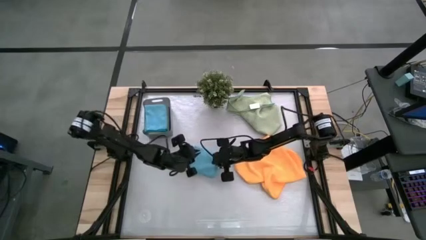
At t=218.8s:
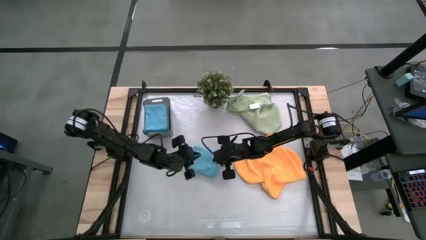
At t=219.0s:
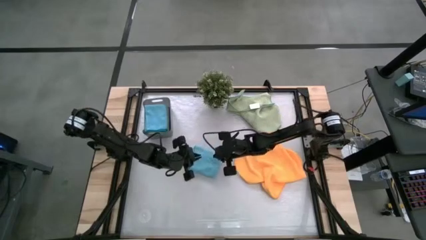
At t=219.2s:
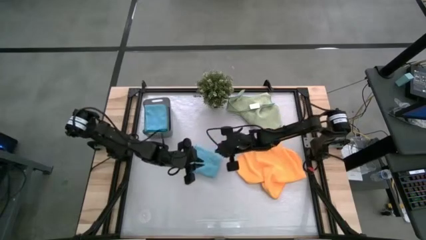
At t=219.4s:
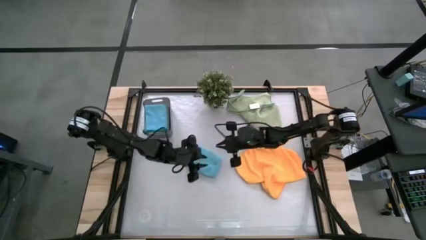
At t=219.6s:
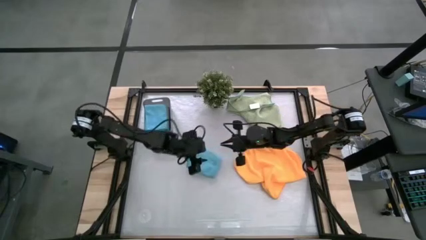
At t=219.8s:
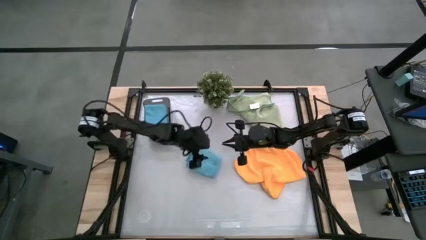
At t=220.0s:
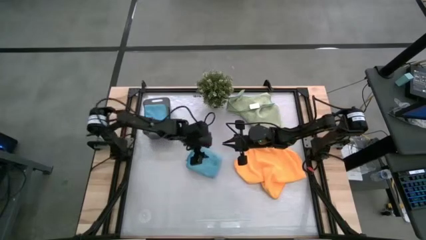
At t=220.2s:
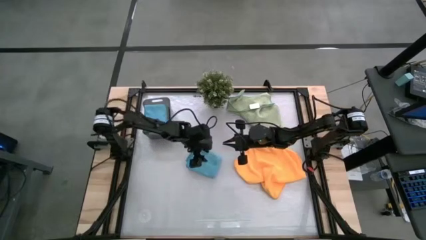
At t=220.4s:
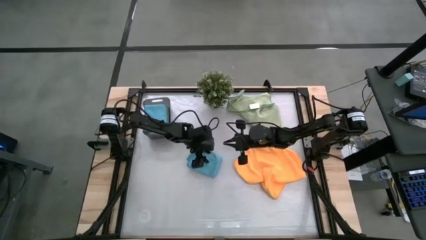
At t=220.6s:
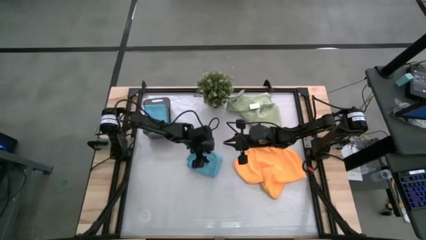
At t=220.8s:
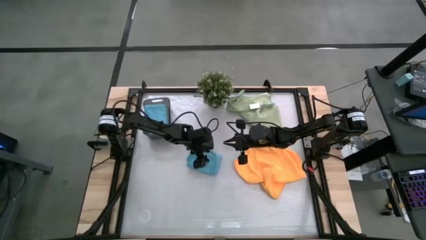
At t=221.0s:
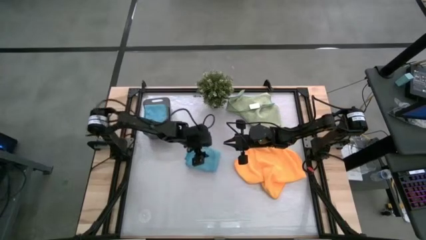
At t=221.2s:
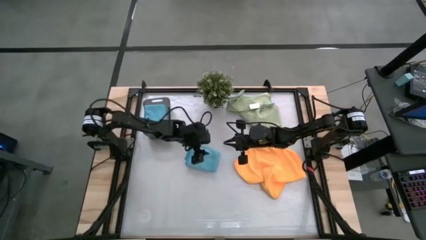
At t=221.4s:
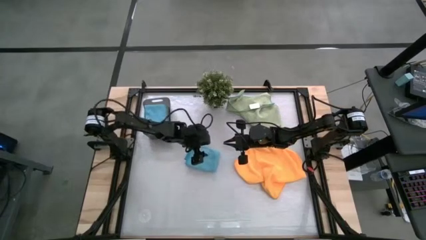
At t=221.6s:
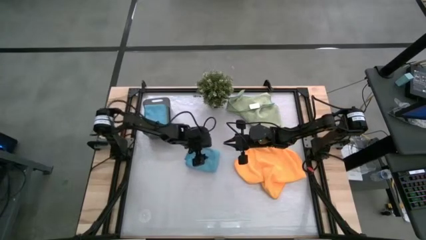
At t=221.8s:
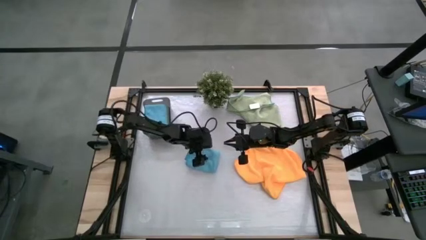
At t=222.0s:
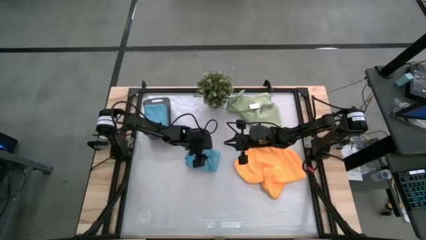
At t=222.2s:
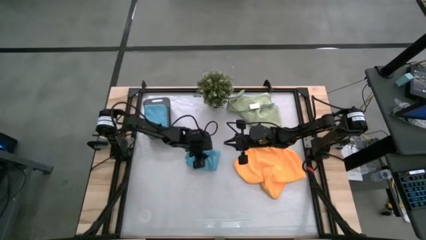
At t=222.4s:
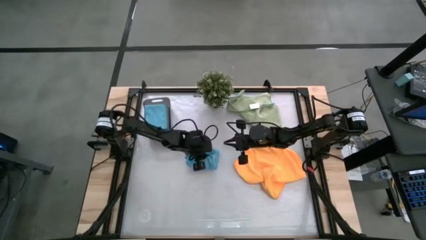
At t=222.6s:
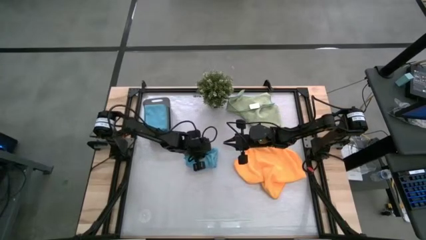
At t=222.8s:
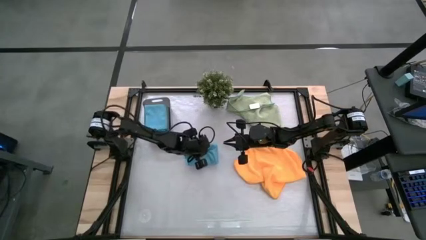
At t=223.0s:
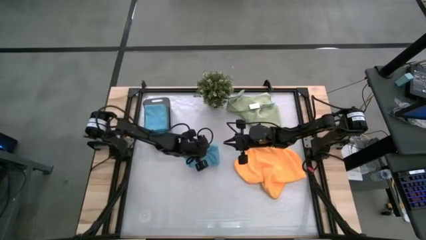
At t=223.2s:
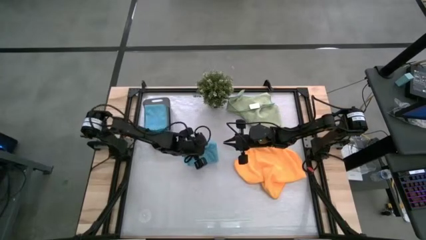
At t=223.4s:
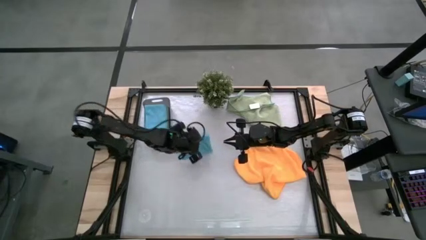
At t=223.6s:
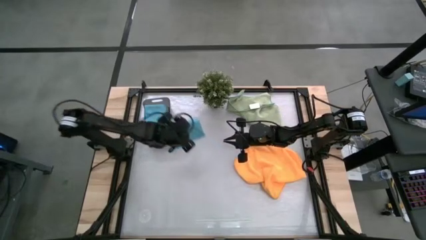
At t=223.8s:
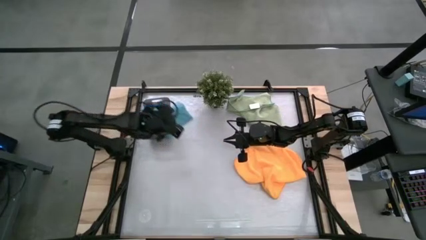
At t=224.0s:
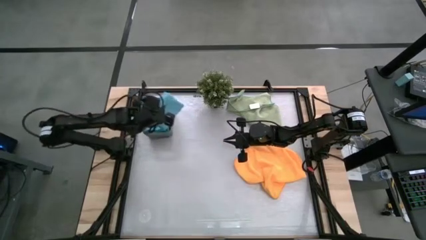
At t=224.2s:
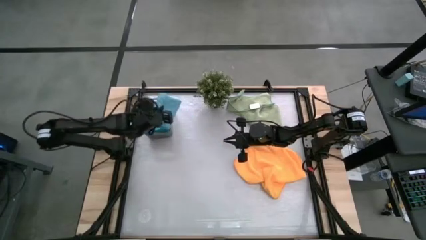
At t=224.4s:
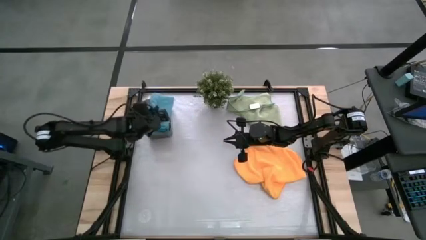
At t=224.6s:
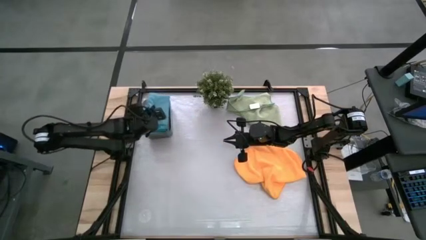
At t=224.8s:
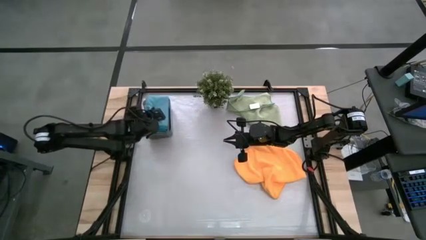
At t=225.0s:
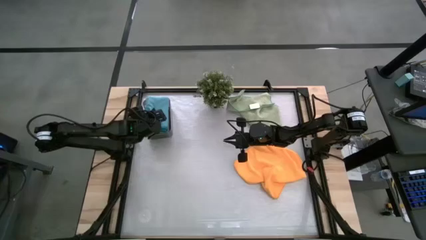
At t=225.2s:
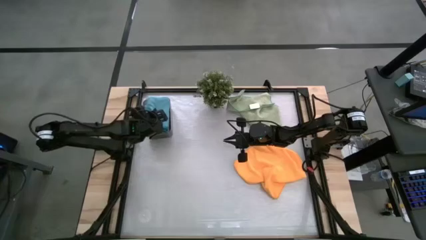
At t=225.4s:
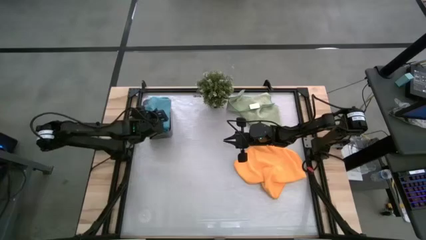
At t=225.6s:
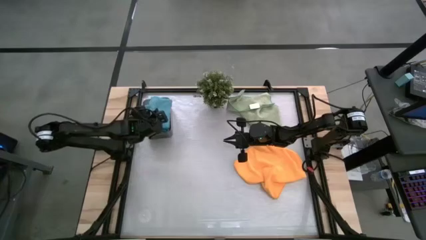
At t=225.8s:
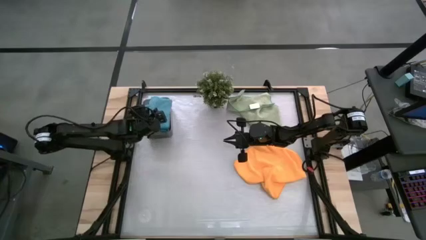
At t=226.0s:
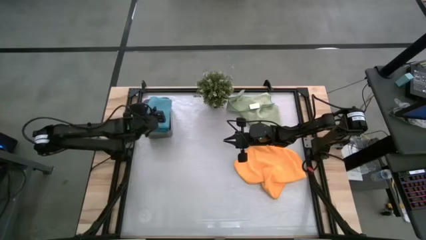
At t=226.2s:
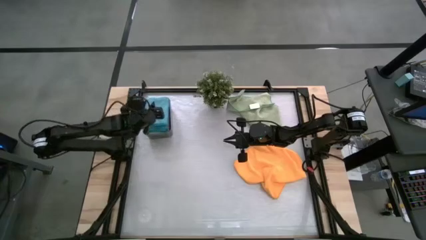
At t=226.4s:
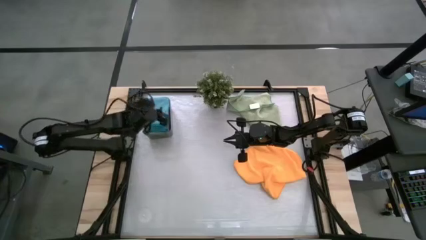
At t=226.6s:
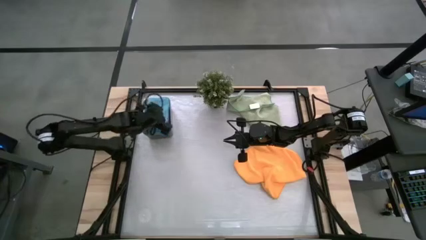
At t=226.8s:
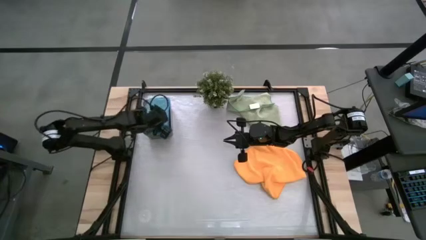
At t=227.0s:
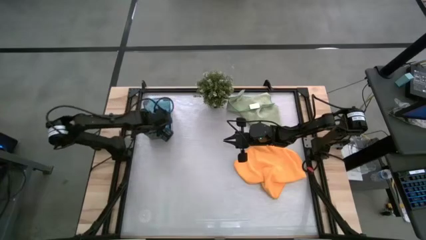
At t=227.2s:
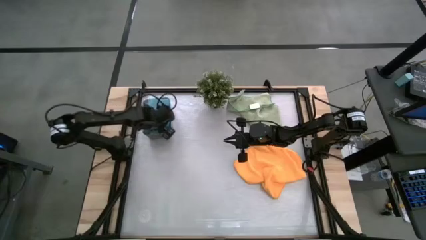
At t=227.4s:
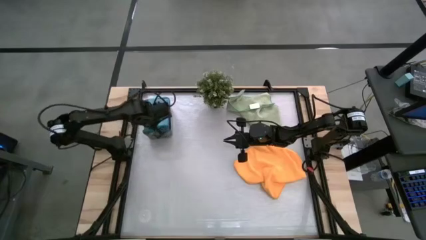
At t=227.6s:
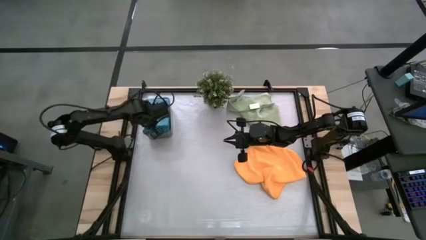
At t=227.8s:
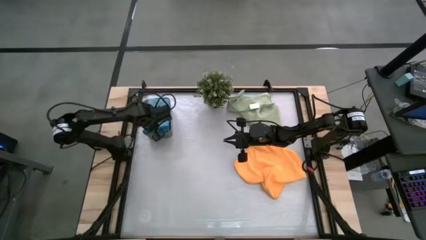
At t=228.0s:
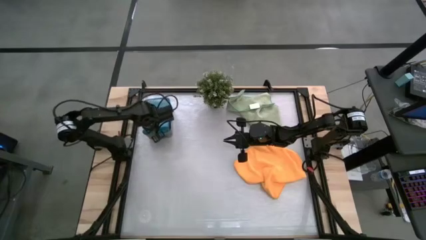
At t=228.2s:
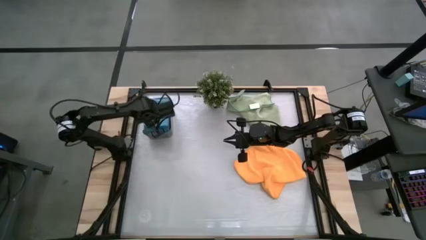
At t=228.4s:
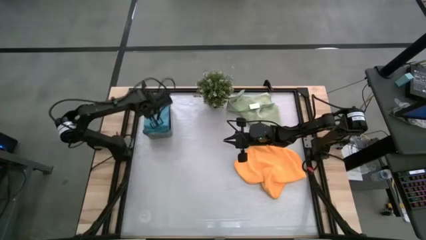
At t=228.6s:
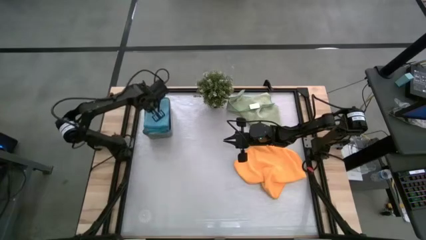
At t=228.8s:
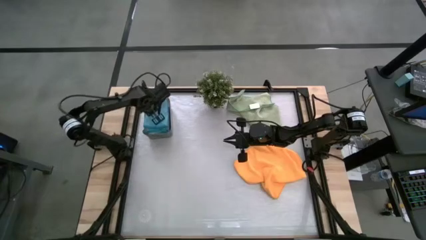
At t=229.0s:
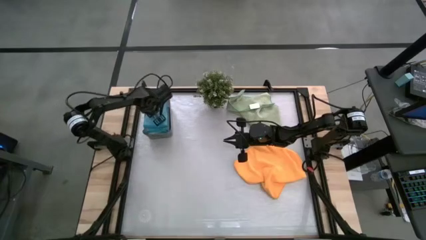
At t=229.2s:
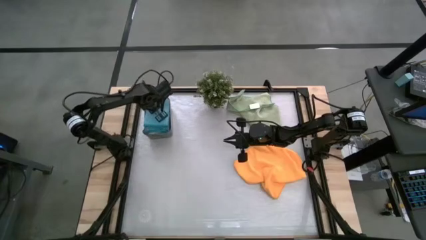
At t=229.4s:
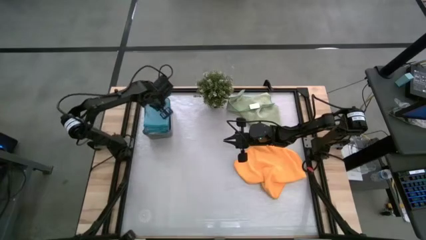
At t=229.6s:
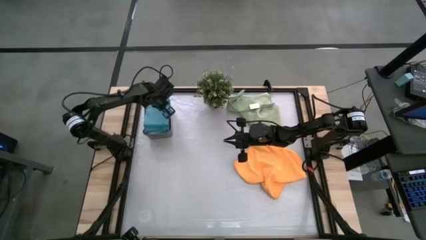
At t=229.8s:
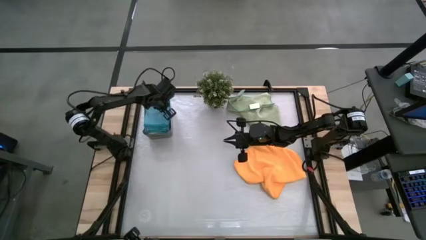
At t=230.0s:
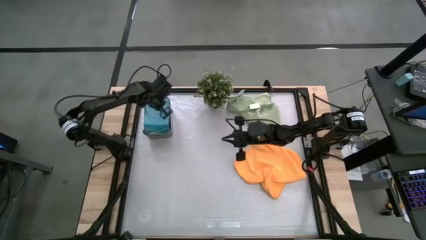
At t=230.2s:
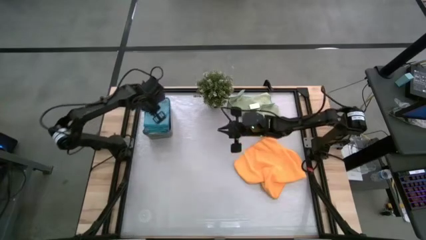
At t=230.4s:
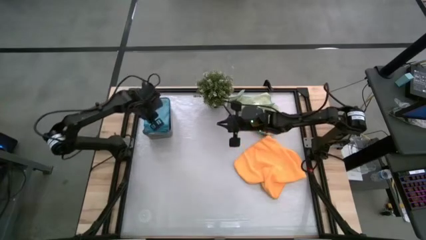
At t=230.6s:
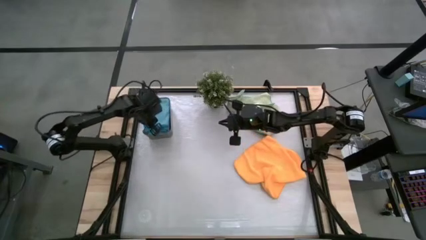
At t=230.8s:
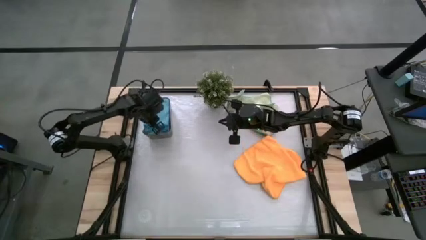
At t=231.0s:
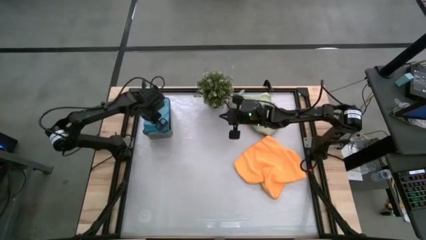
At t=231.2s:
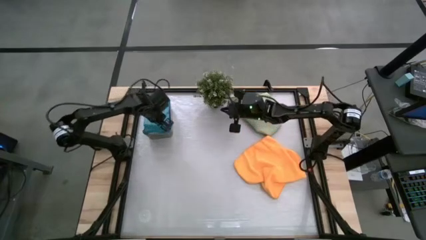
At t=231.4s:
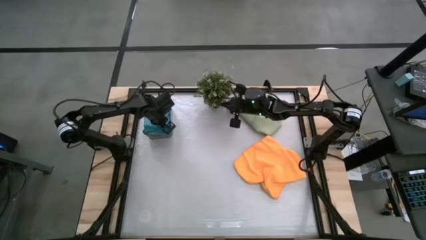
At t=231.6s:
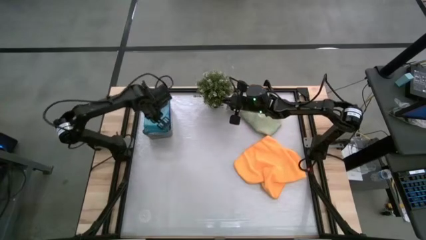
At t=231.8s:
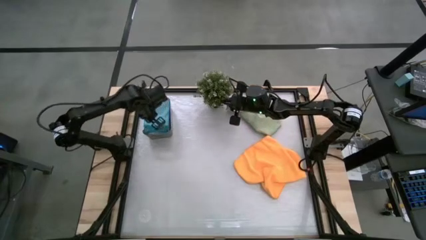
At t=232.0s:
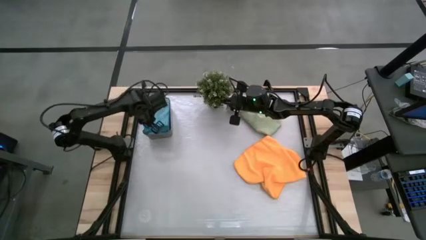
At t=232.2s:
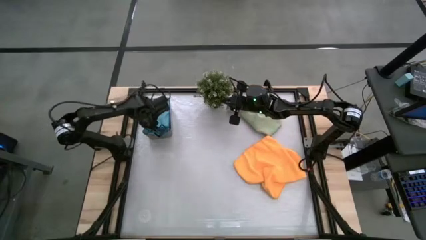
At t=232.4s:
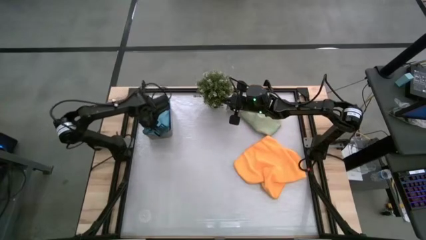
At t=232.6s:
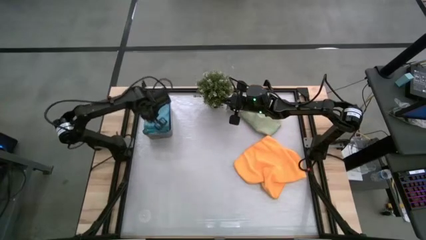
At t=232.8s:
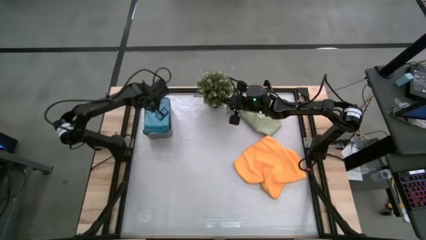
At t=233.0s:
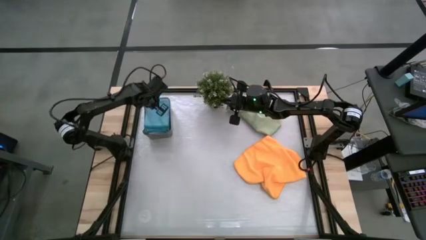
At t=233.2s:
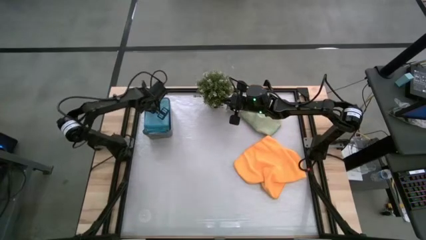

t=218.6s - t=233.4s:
Task: Fold microfiber towels
Put the blue microfiber cloth into the black bin
